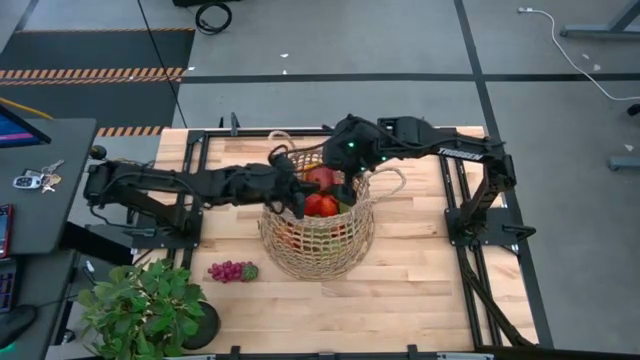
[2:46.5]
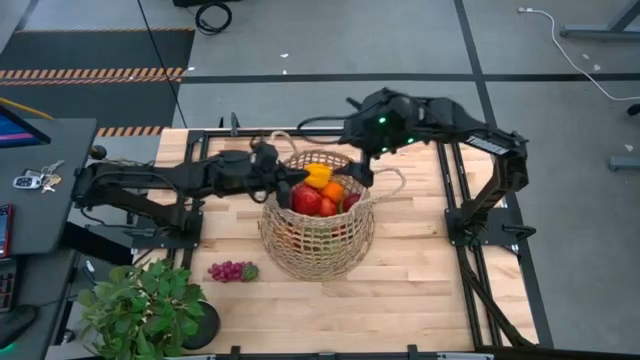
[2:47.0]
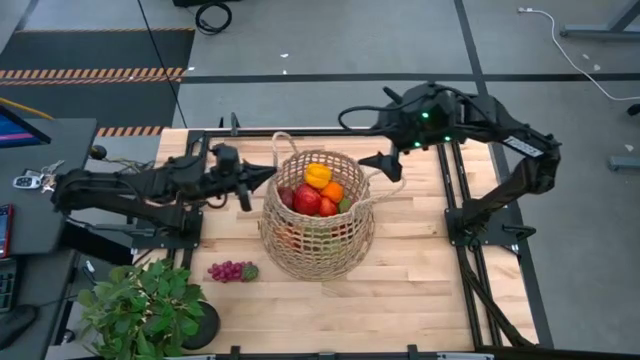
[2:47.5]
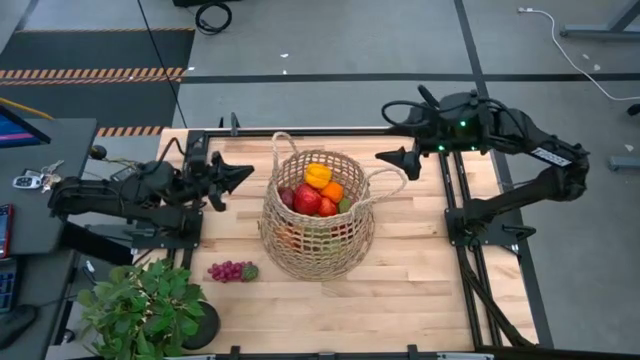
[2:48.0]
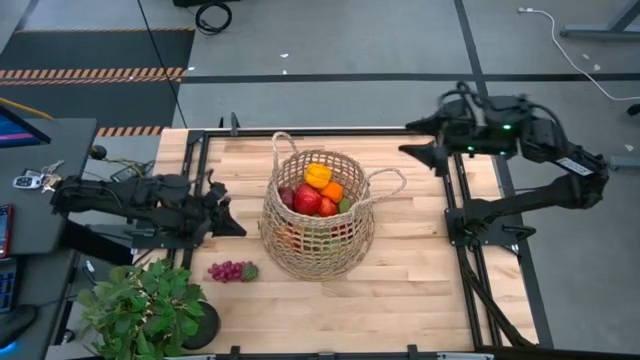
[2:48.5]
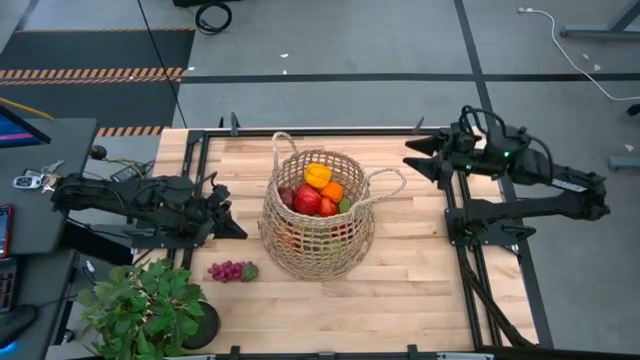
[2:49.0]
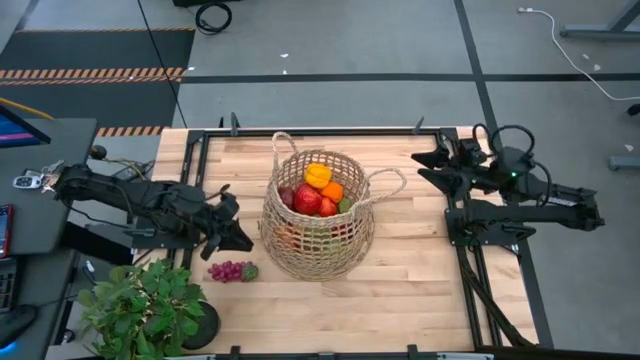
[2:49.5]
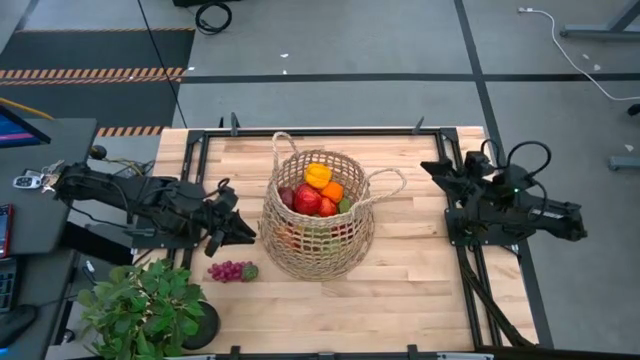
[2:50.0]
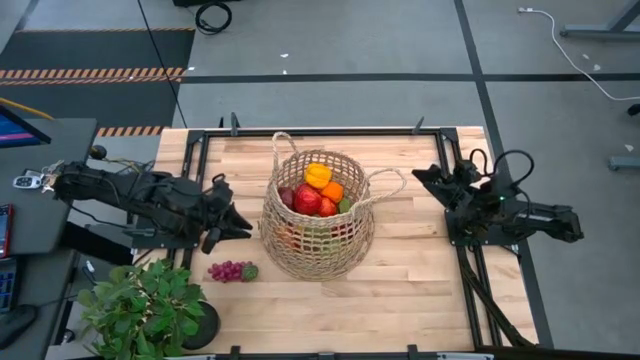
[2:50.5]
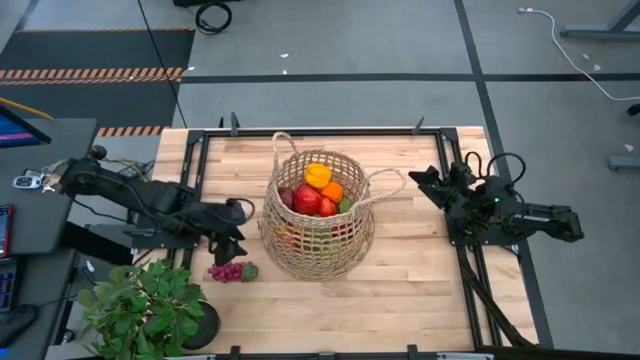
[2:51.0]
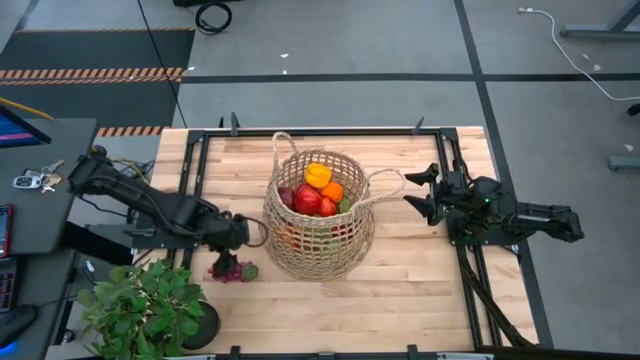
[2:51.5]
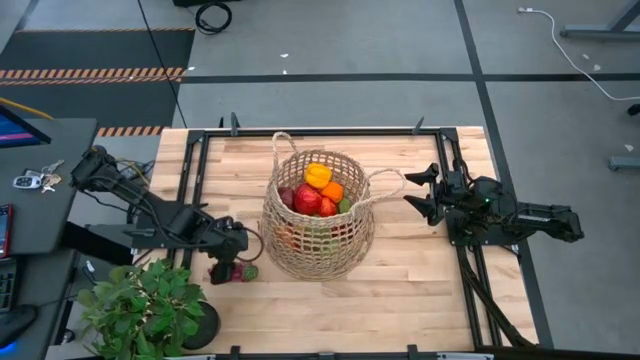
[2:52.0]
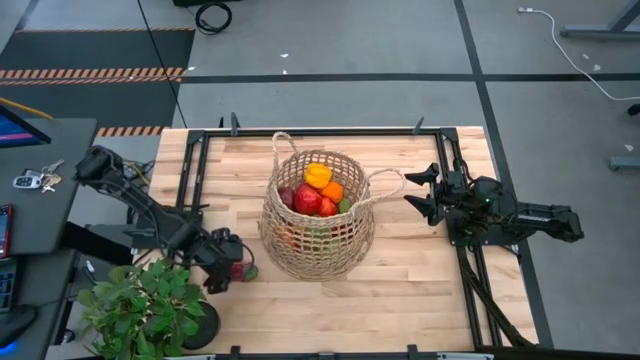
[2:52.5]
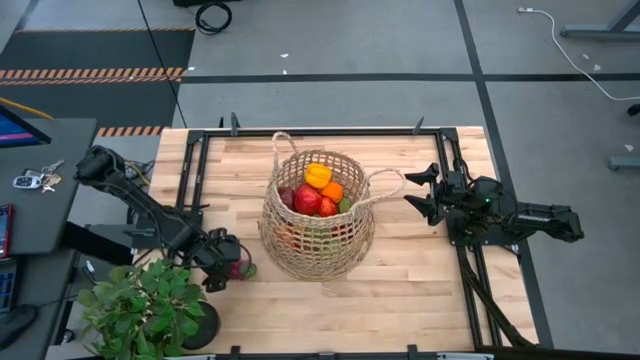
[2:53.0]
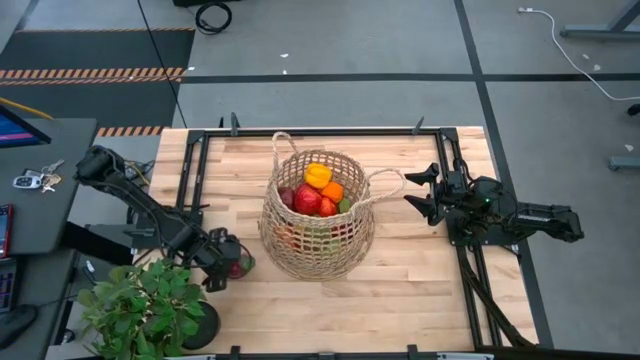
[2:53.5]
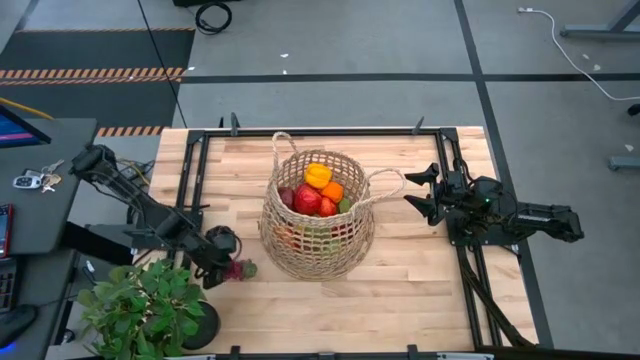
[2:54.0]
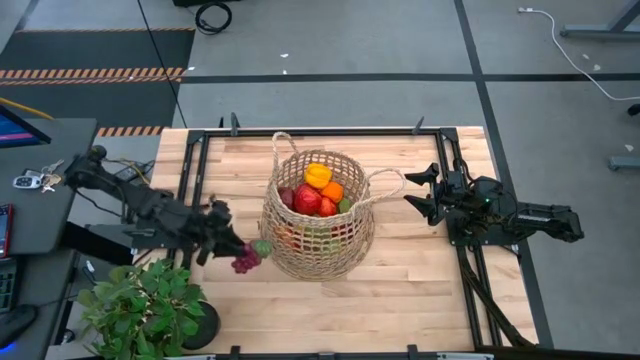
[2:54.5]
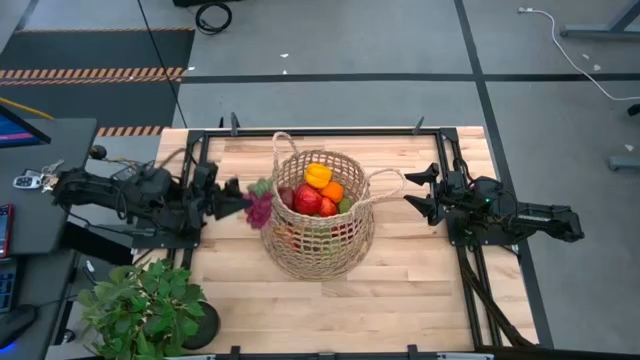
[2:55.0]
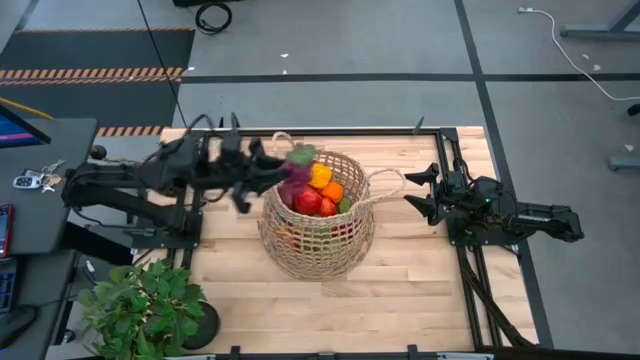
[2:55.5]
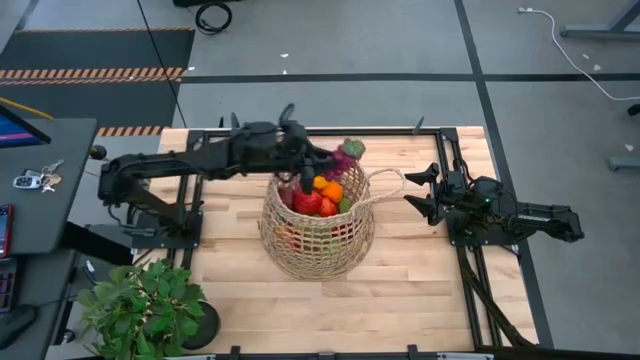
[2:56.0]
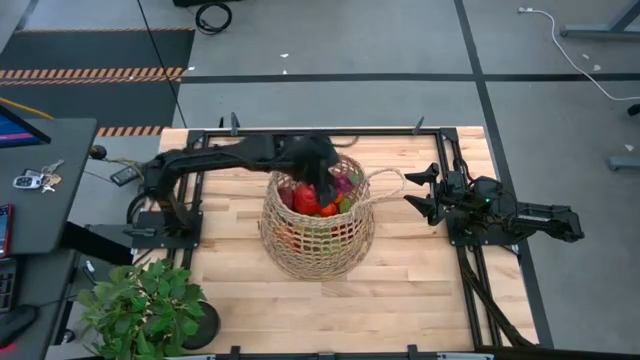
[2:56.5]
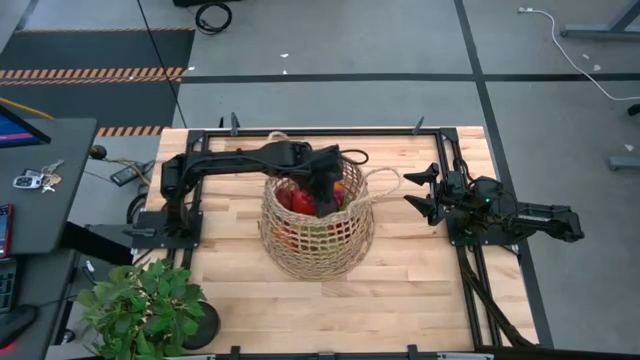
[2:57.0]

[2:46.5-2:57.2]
Task: Build produce basket
Put the violet grapes into the brown basket

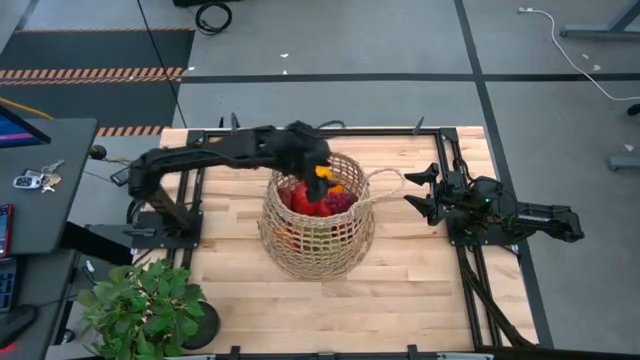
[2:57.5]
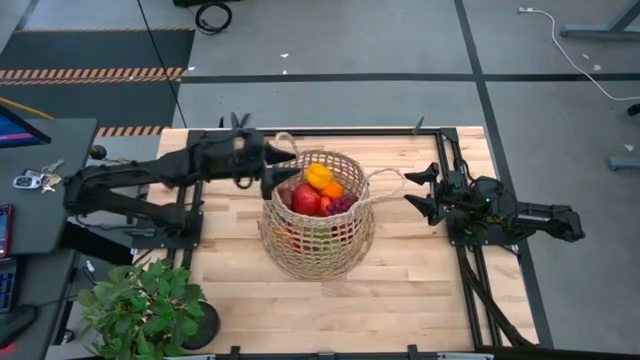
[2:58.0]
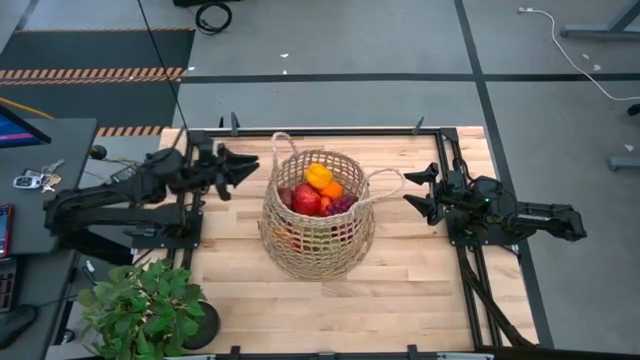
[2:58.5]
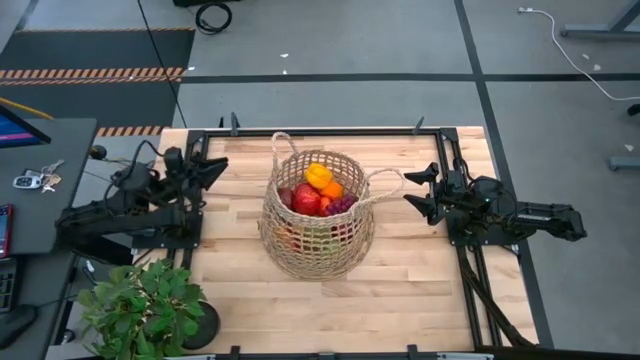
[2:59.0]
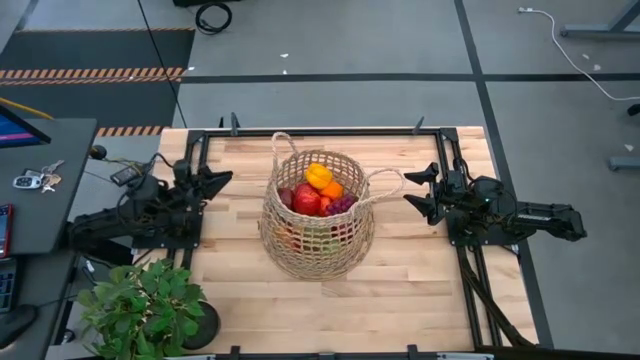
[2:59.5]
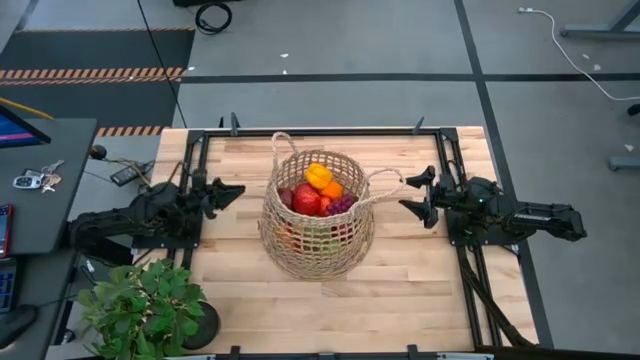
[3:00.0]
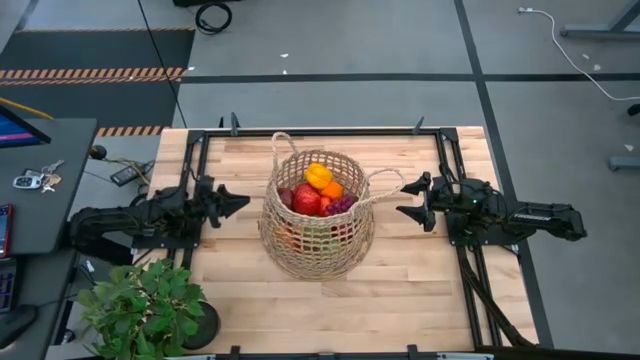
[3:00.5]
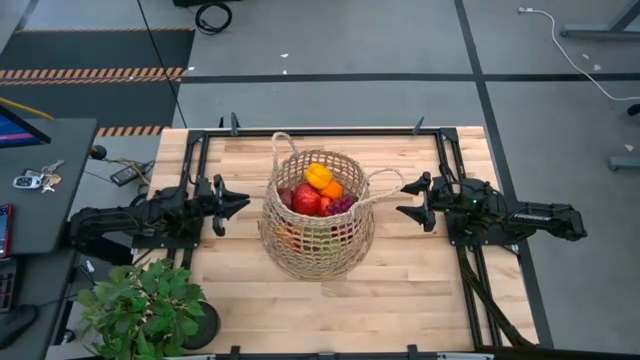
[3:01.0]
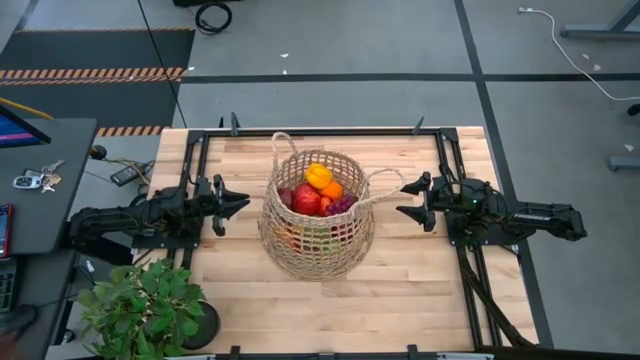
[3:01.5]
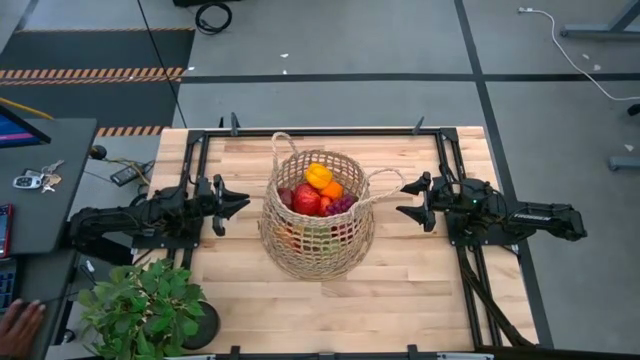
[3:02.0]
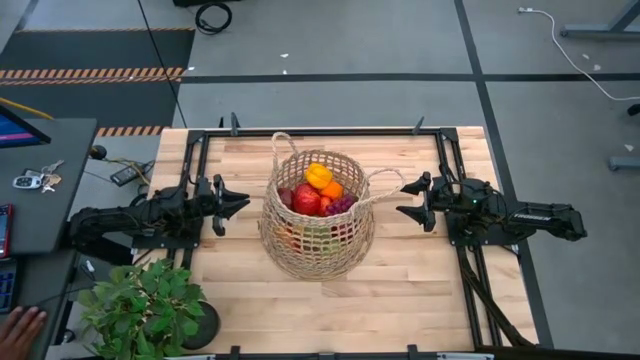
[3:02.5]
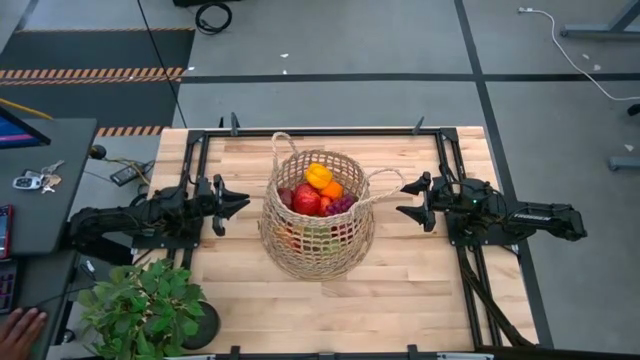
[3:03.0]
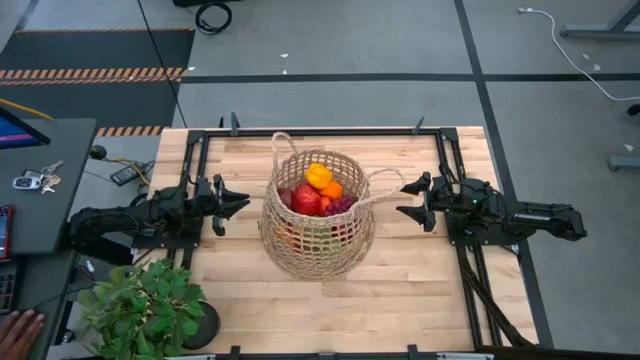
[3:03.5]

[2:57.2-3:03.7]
Return to Home Position

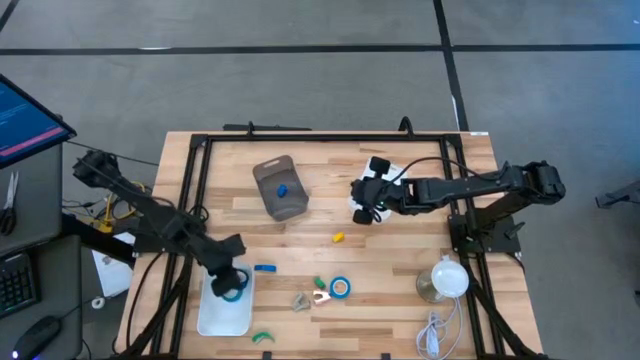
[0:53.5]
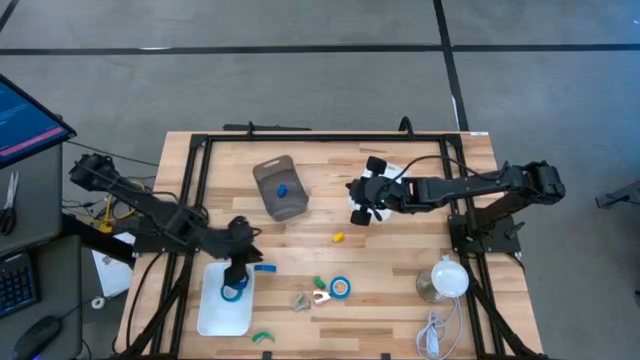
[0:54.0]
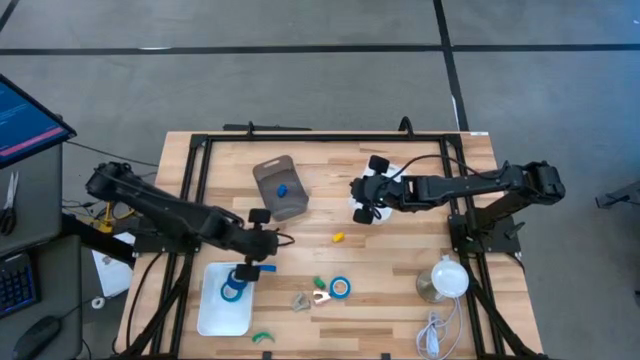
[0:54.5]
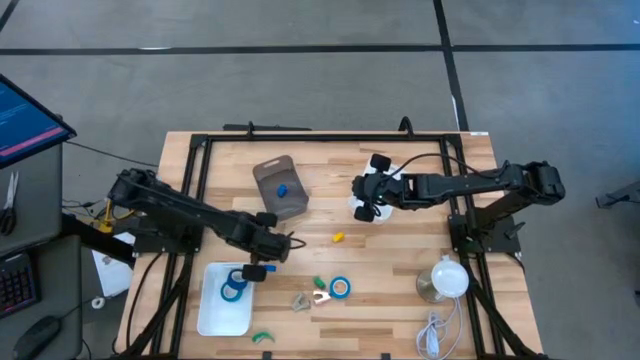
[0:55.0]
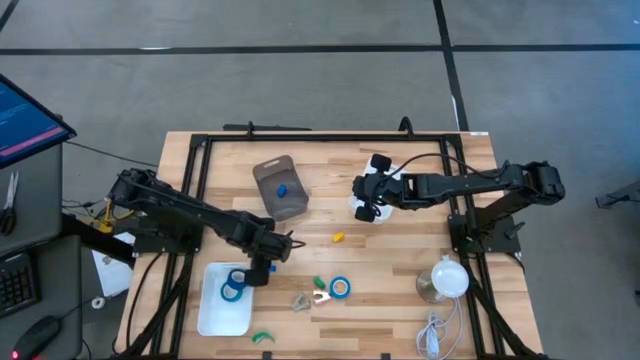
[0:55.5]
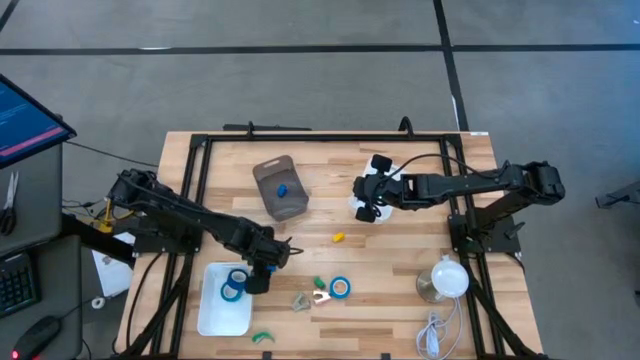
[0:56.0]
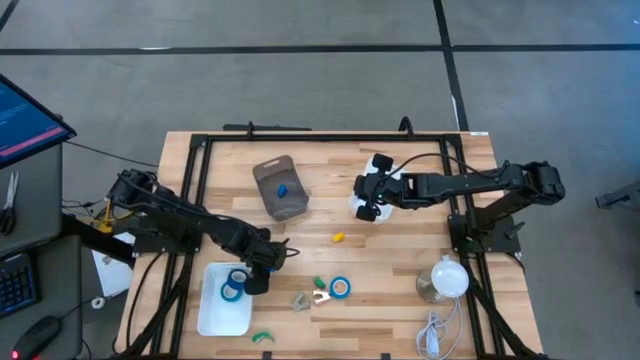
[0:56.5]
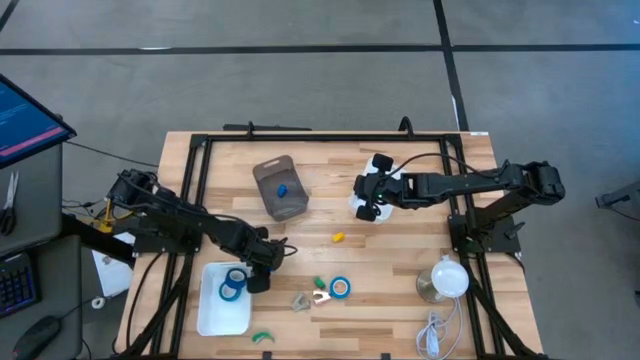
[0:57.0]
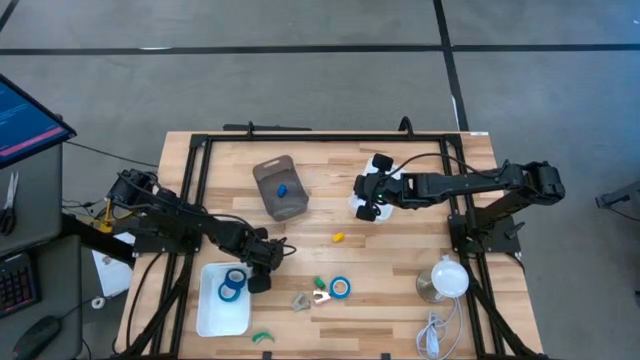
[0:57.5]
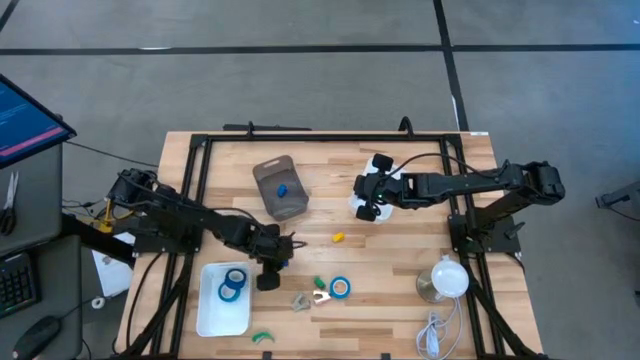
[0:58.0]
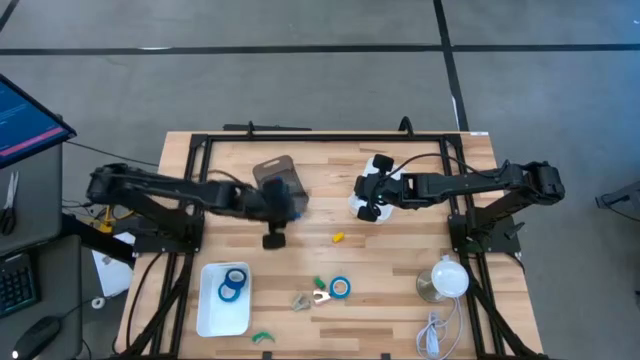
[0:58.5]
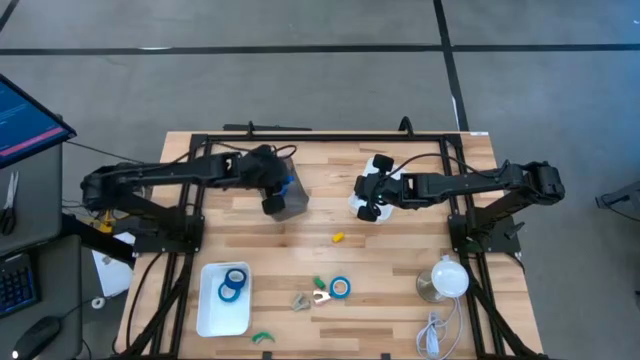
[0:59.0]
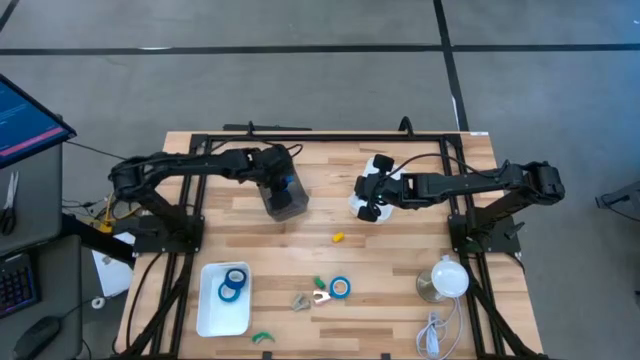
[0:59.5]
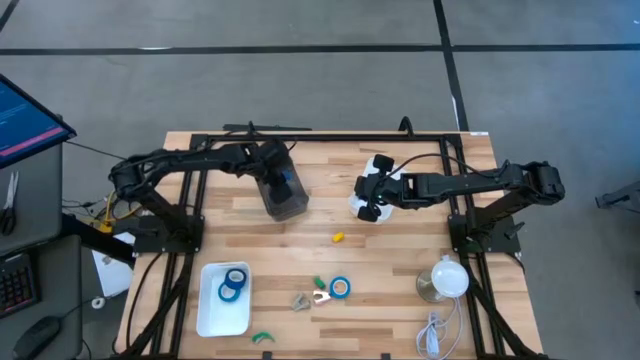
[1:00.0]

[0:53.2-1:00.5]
Task: Pick and place Stapler, Stapler remover, tape
Put the blue stapler into the black bin
